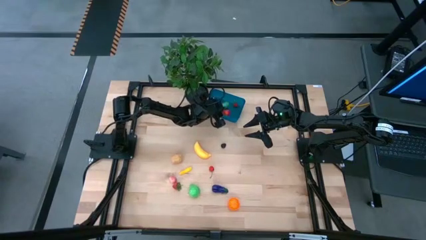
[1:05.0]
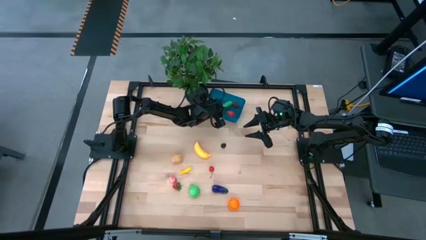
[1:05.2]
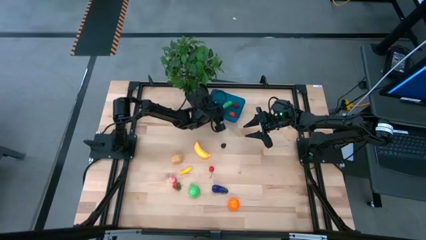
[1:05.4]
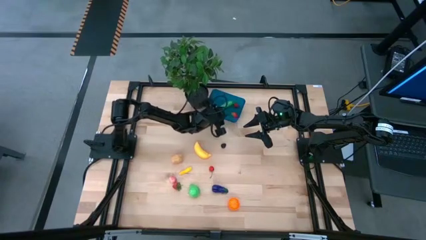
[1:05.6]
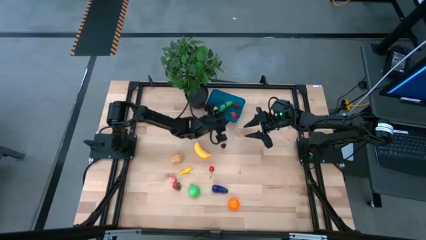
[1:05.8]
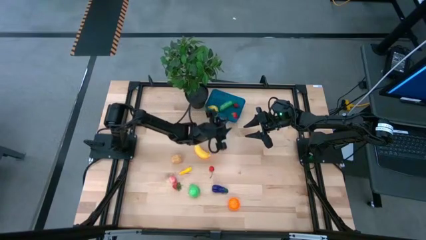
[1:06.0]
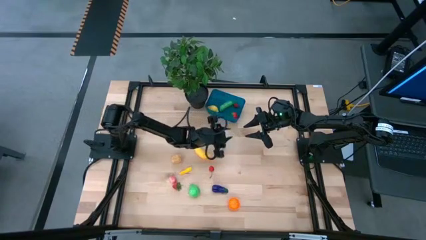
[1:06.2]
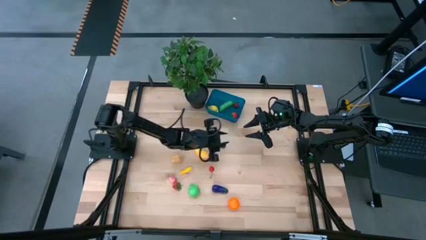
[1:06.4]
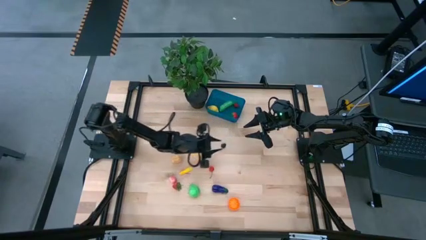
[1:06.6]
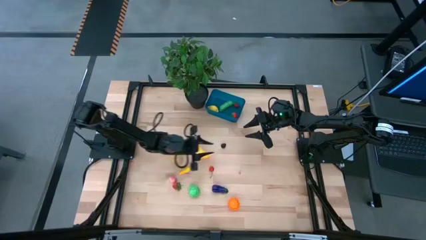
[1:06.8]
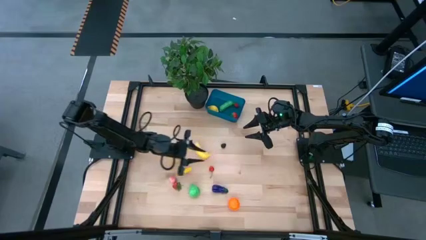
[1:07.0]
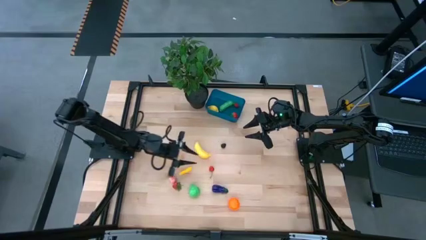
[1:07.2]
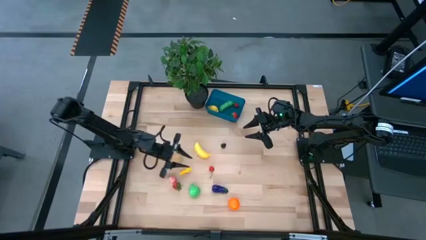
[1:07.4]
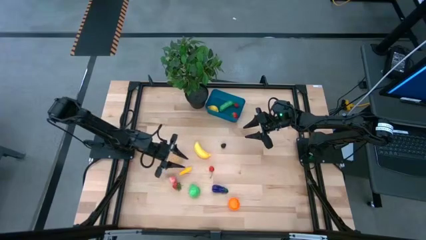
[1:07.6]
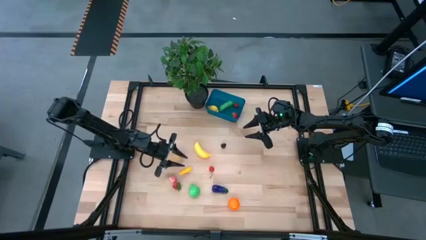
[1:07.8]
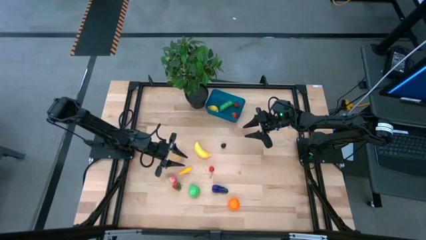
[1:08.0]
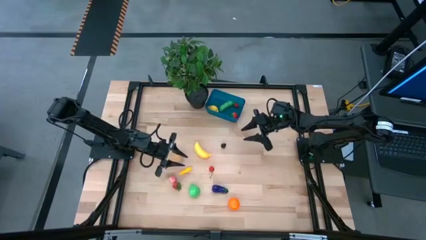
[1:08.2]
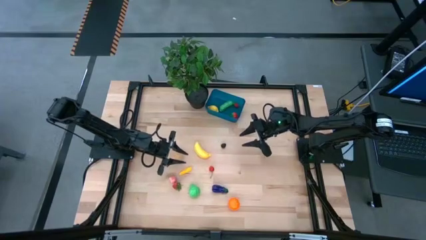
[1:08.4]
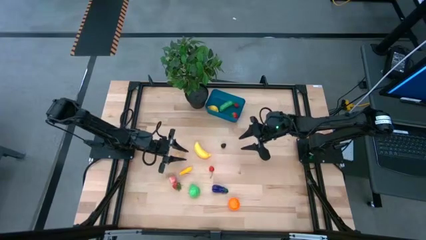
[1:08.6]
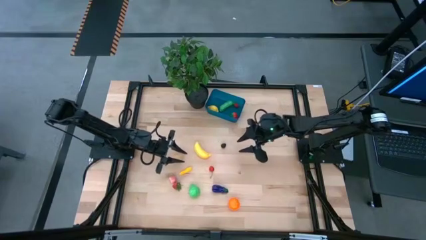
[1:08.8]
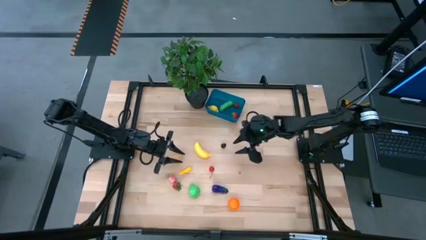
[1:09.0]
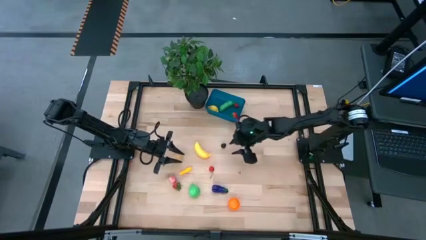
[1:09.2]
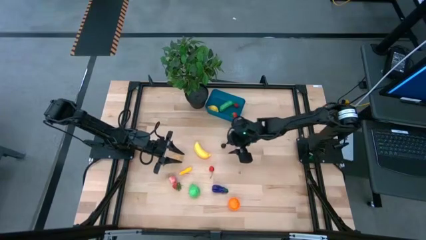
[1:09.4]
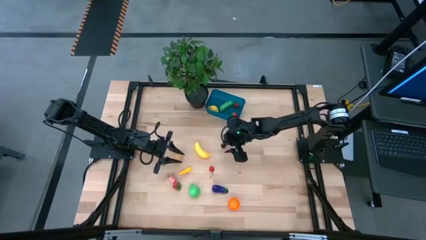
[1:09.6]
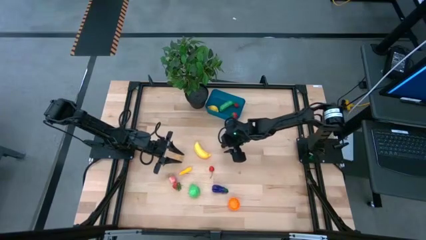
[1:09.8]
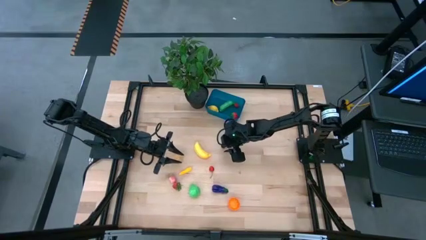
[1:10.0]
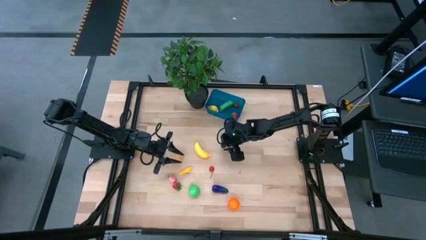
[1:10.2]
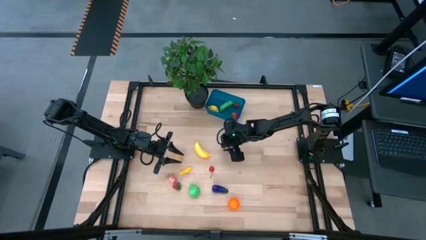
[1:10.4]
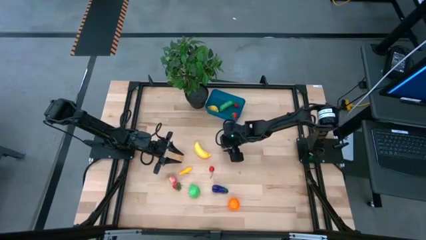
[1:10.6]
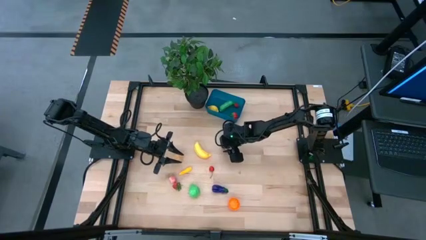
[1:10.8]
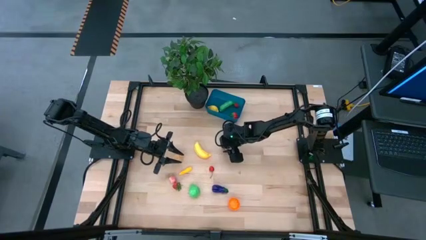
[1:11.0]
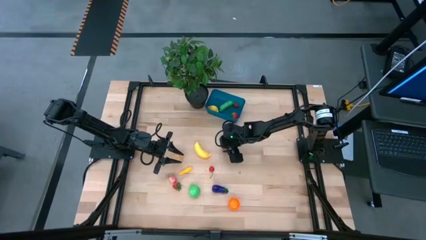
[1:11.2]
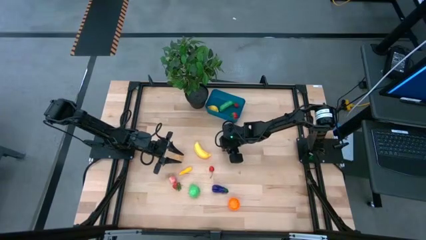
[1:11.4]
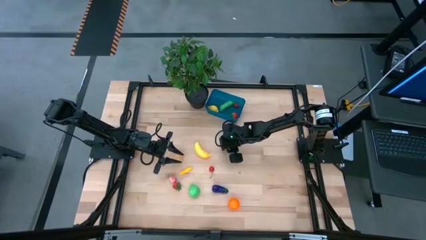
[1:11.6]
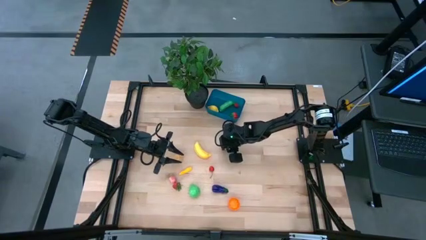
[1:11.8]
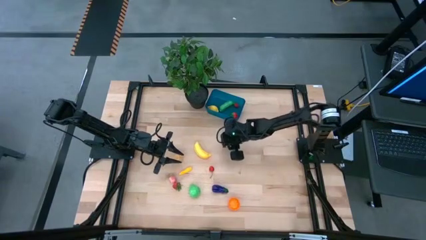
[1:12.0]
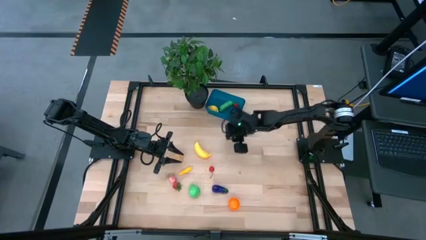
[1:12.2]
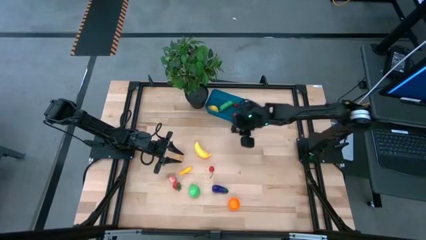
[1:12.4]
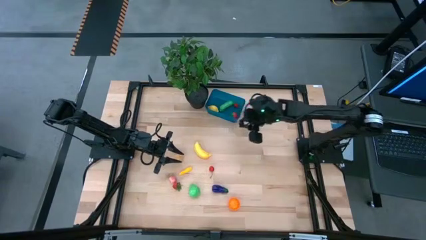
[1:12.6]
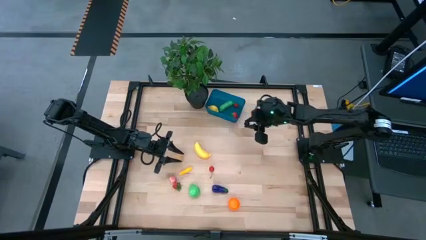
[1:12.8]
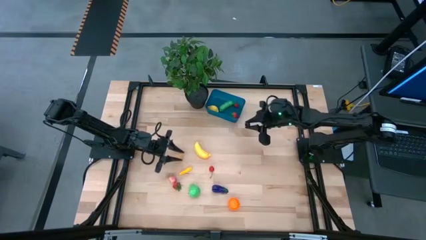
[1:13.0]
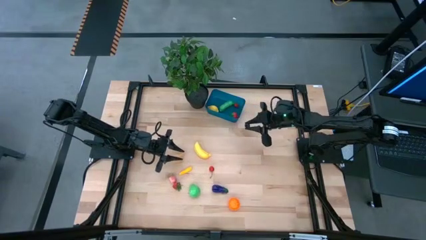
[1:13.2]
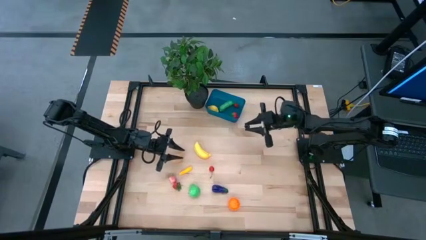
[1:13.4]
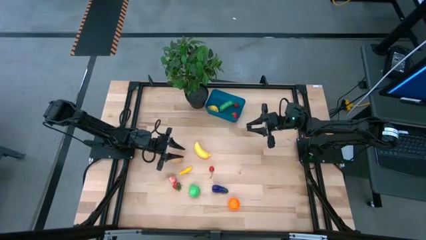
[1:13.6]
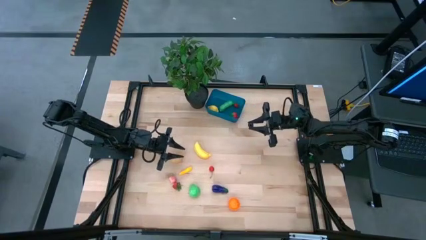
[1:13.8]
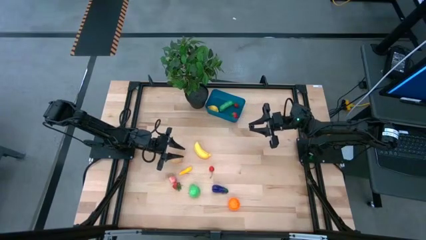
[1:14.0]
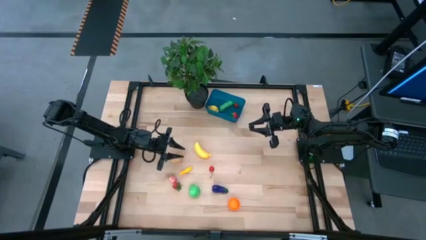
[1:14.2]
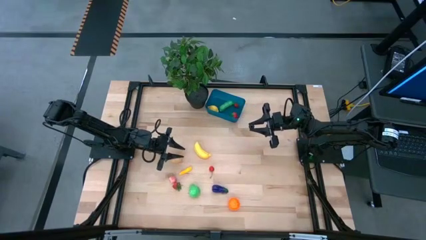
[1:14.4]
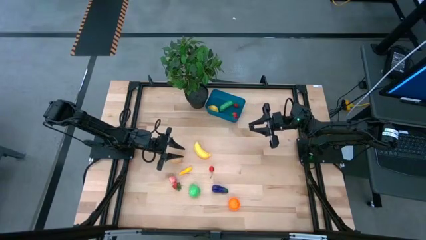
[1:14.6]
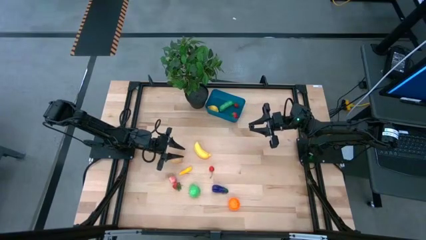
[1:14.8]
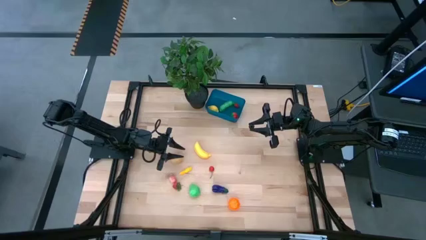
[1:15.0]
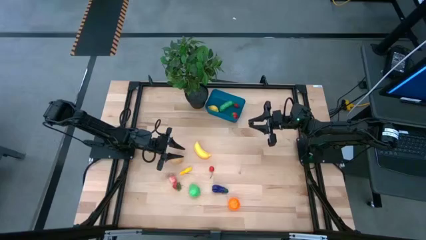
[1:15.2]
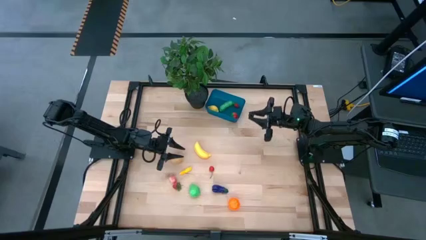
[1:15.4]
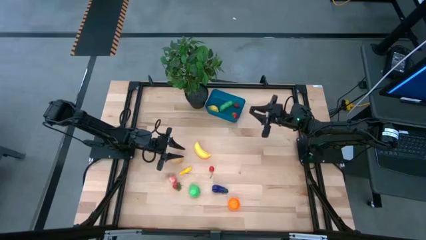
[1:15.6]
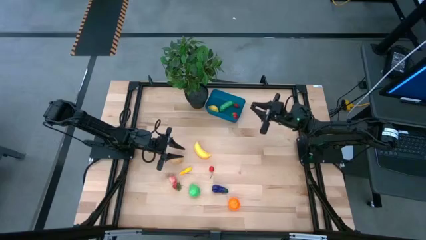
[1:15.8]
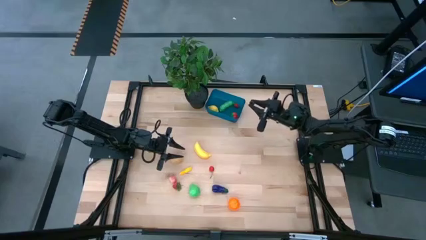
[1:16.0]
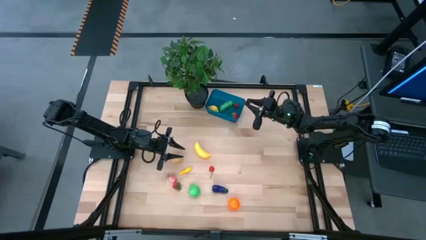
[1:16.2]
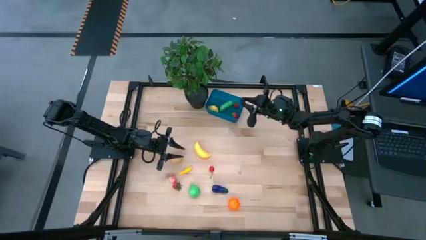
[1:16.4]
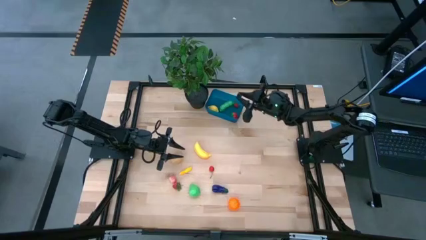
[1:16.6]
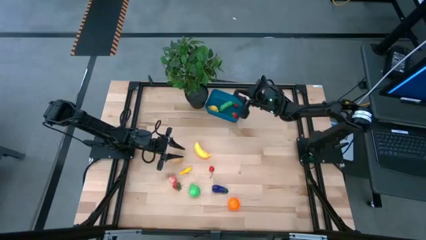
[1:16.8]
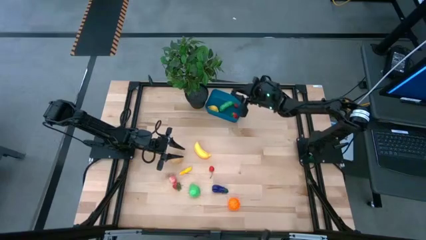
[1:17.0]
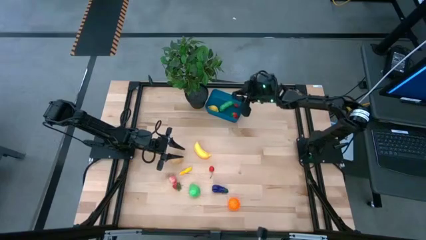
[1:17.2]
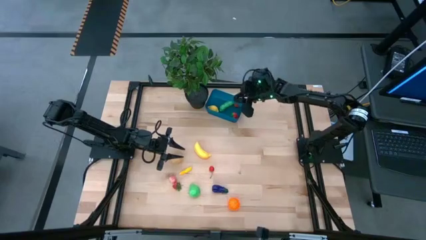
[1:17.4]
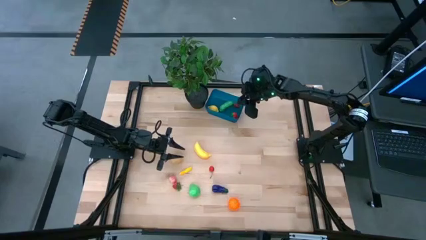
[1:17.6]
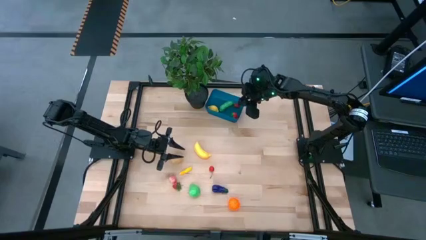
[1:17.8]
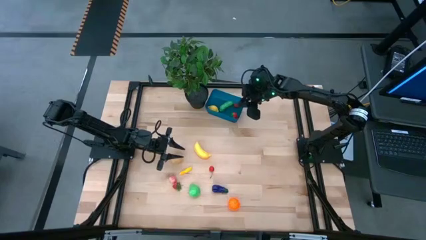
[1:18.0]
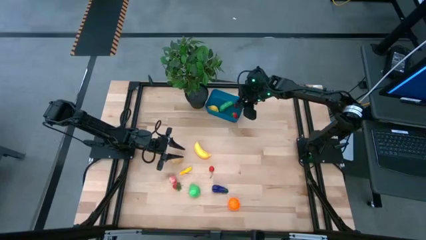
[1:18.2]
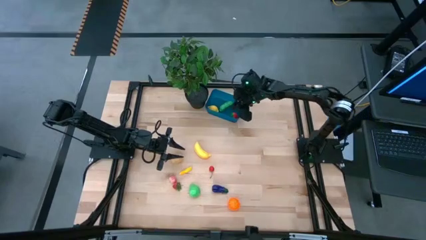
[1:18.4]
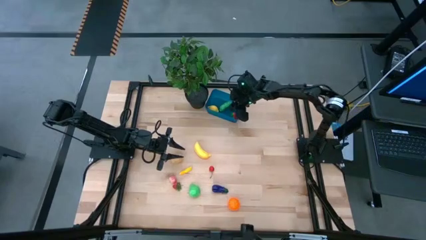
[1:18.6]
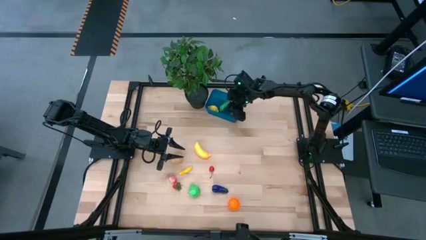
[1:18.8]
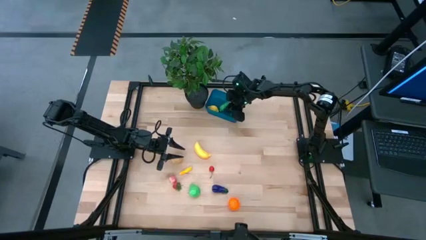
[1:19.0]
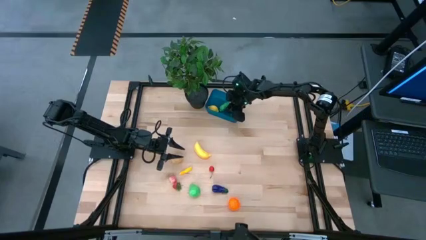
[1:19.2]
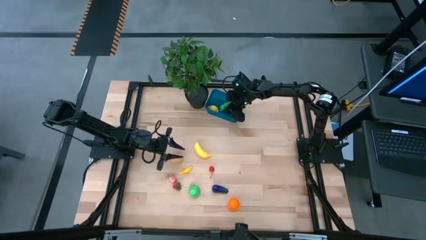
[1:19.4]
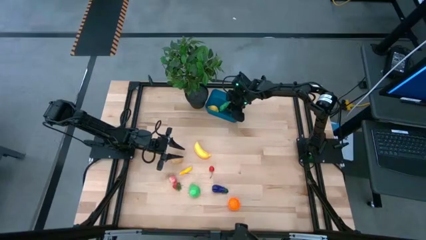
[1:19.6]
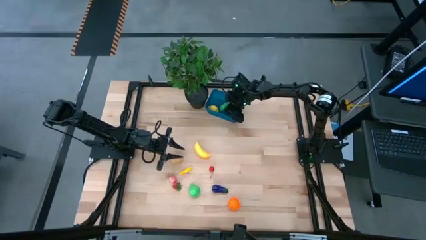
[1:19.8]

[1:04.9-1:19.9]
Task: Pick and placing Produce into tupperware
Put the black raspberry into the blue container
